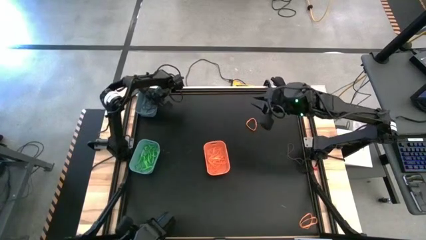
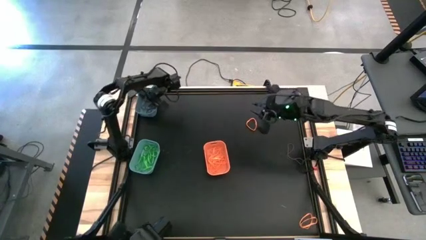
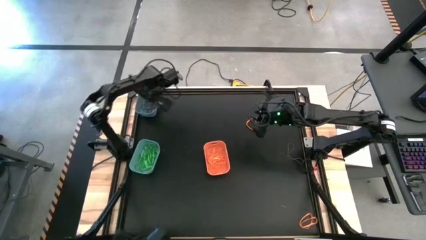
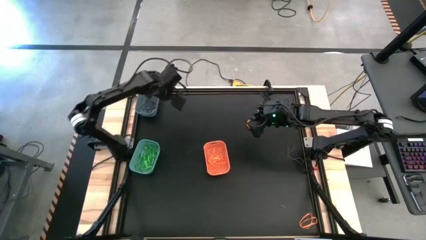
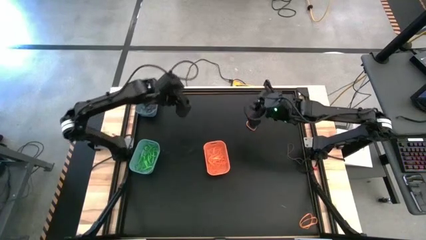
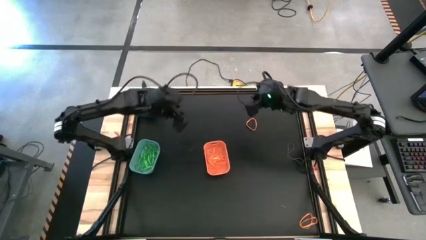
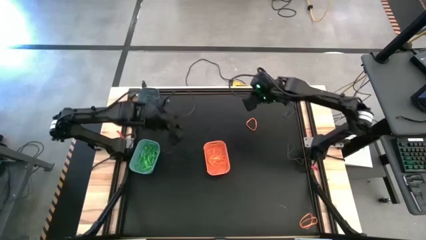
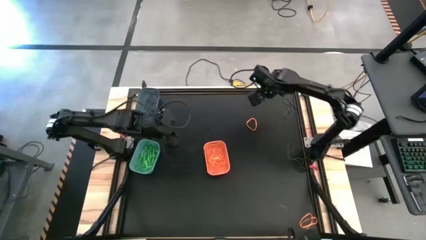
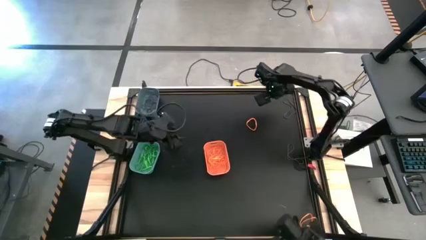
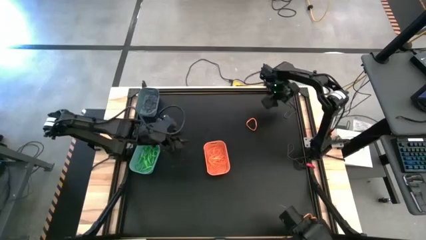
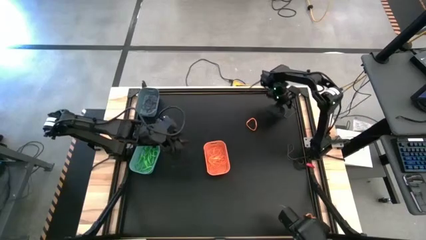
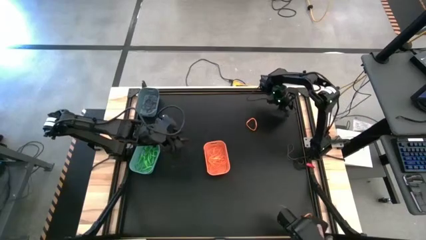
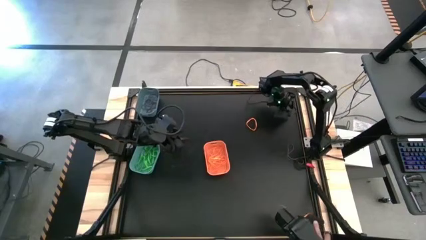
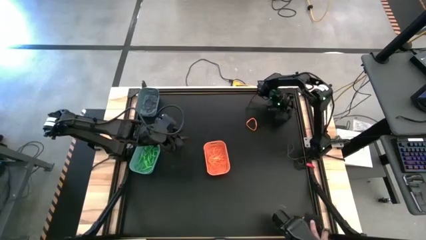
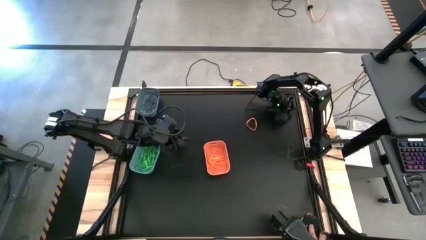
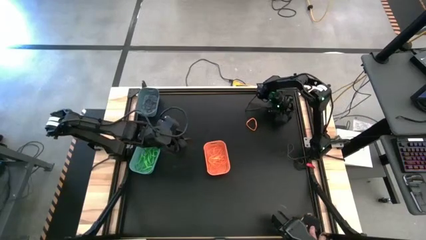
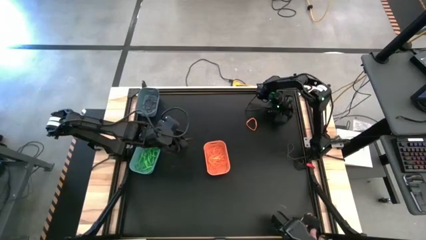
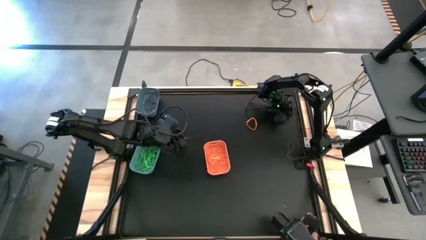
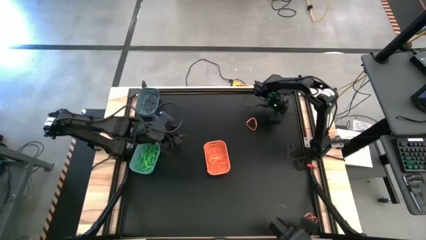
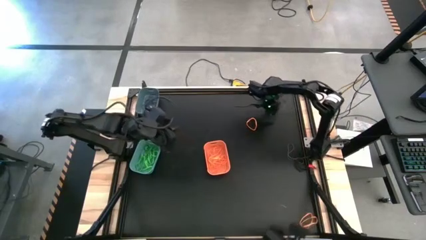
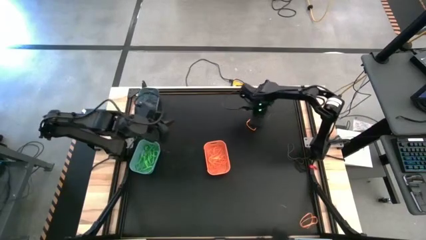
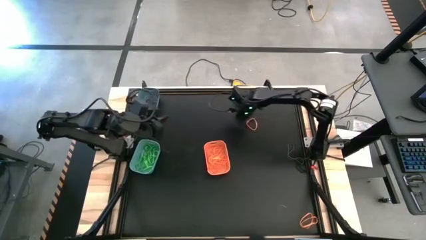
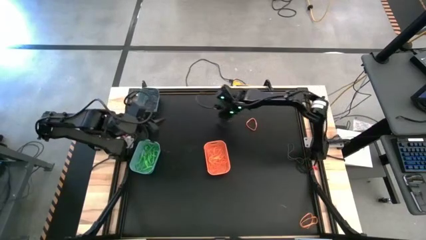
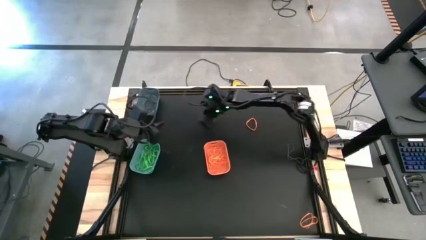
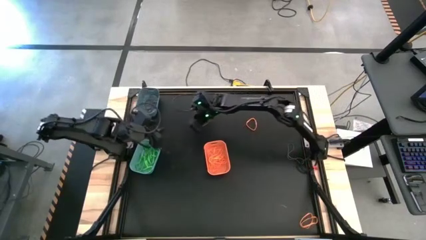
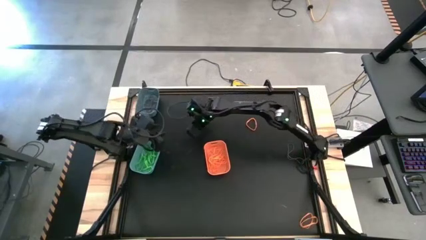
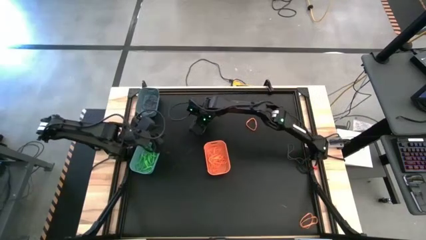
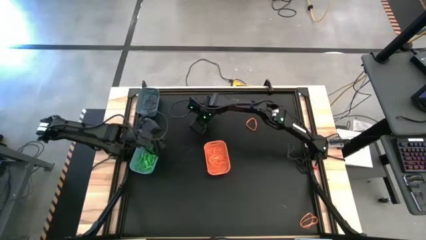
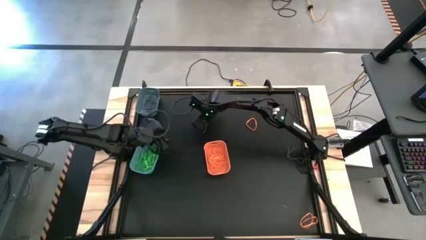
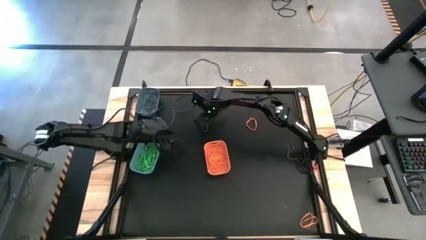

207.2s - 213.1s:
Task: Sort rubber bands into baskets
Move the purple rubber band

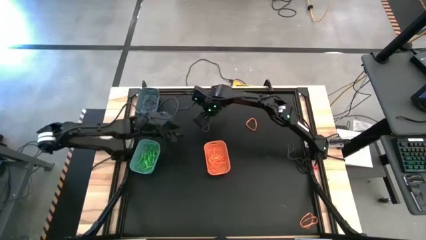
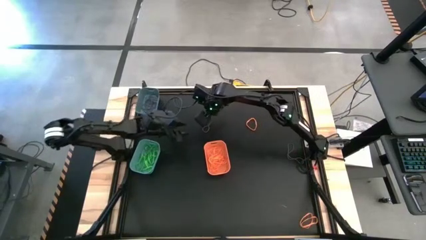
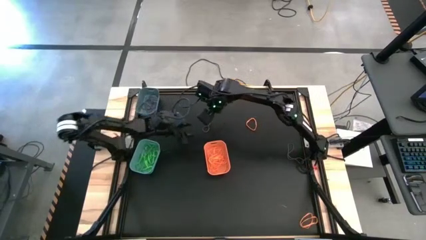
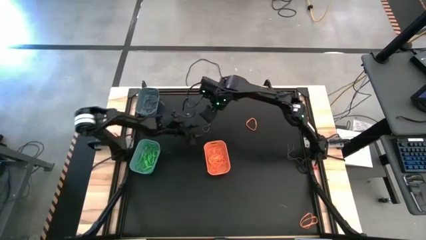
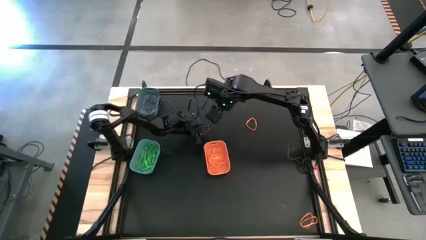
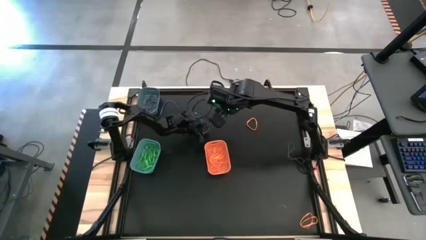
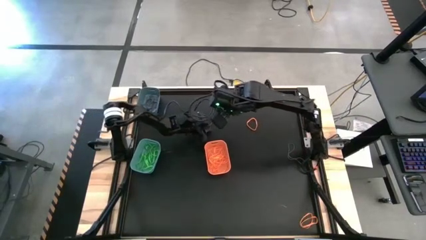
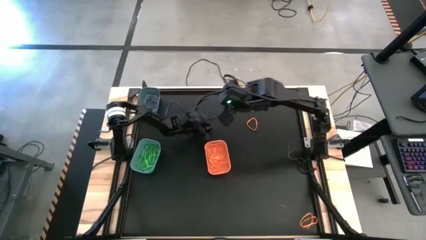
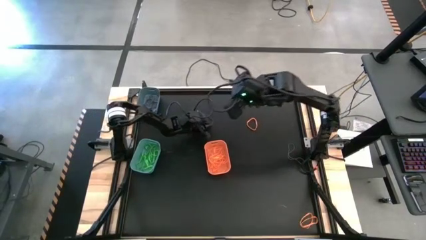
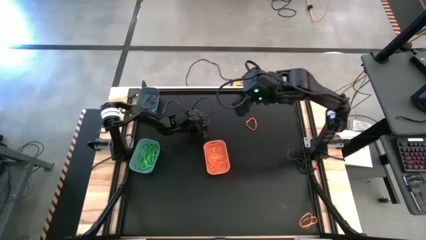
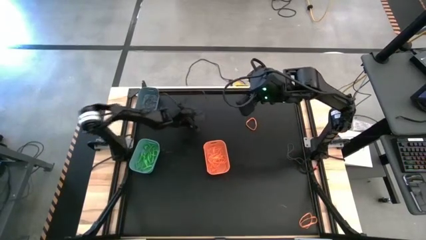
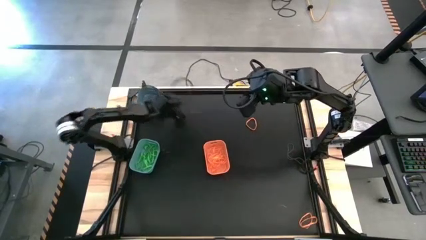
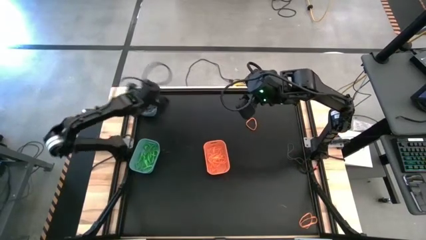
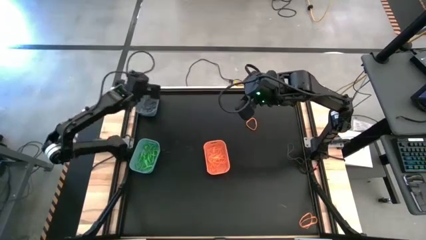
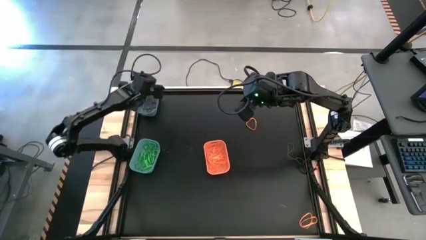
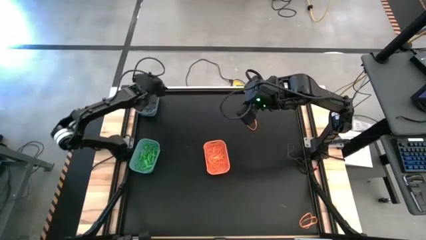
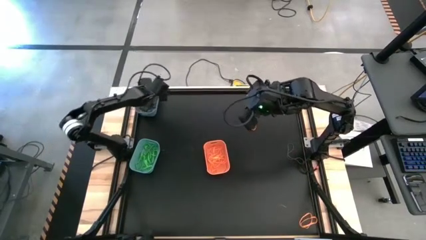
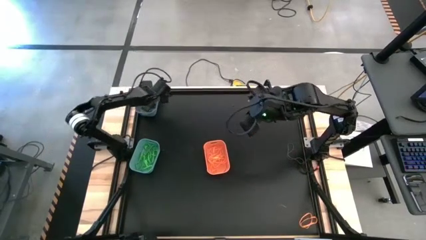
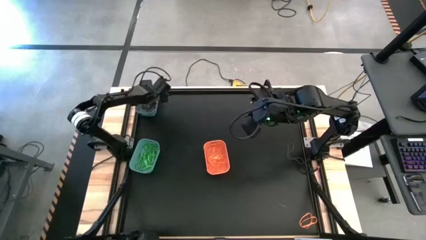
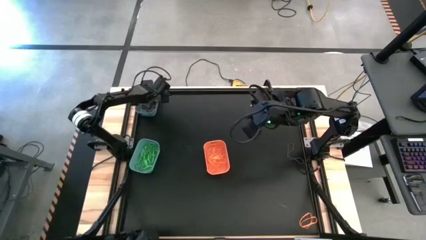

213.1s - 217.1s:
Put the purple rubber band into the sky blue bin

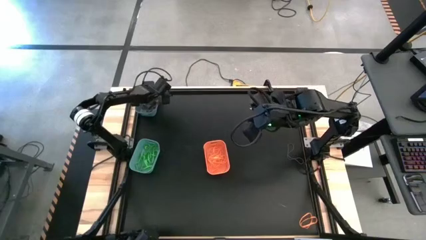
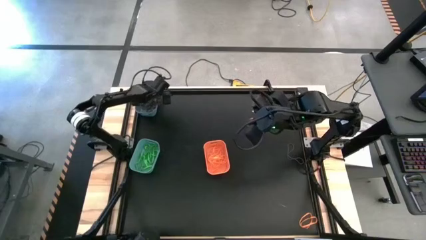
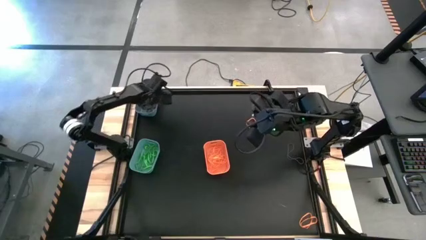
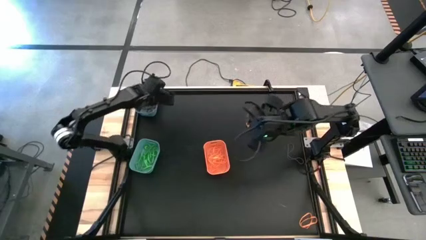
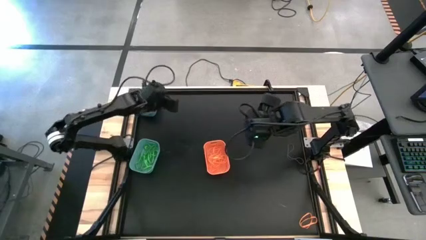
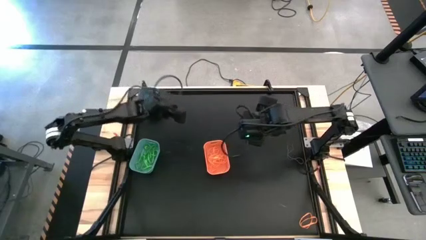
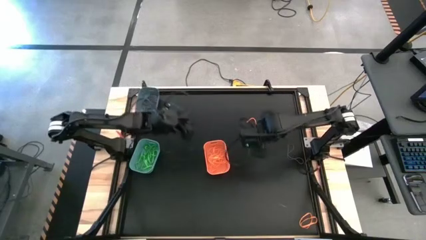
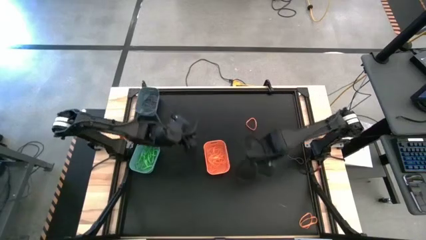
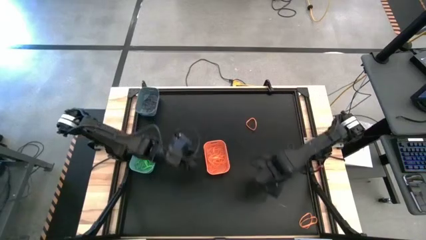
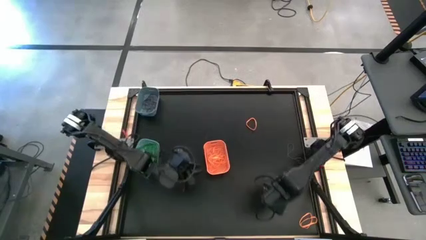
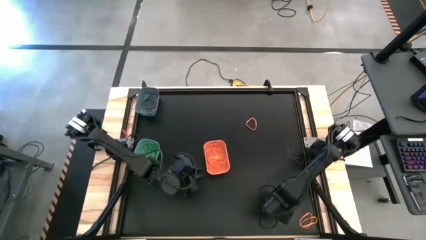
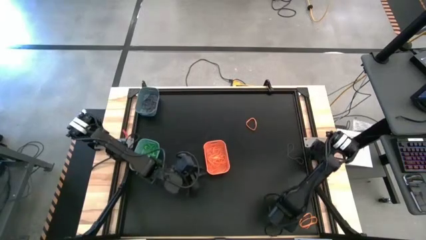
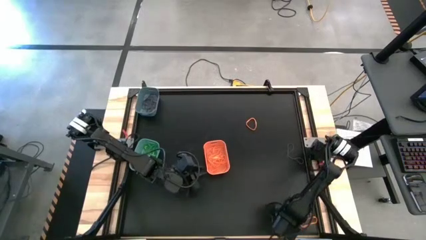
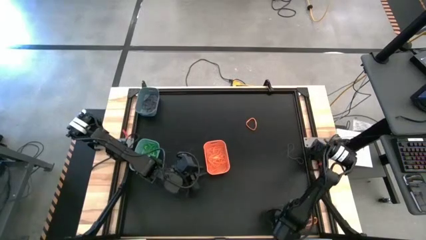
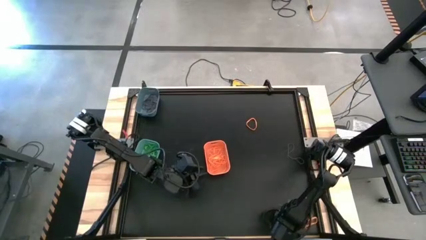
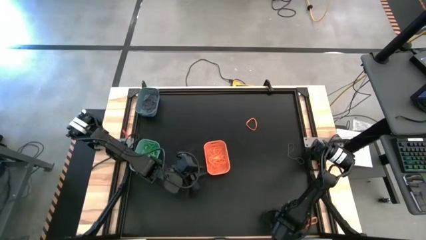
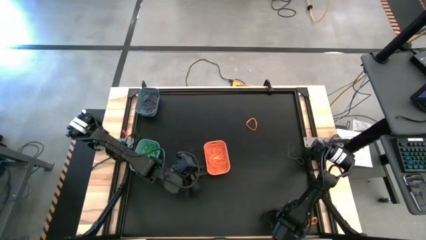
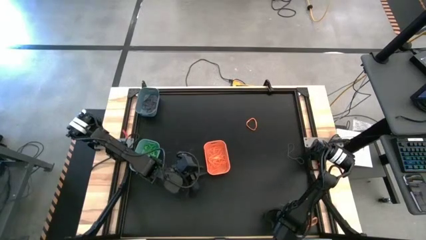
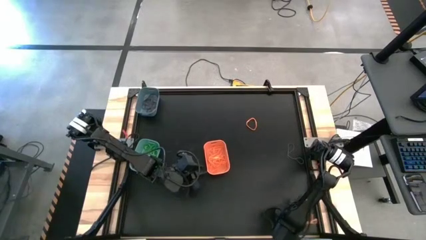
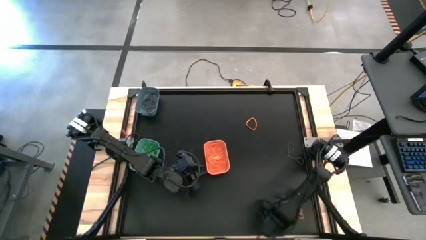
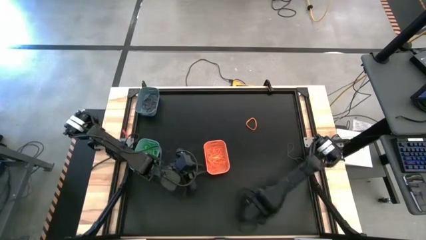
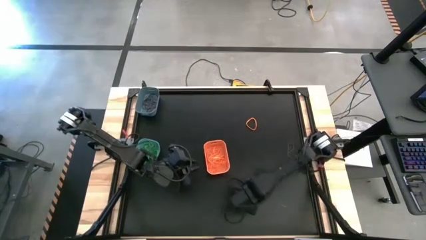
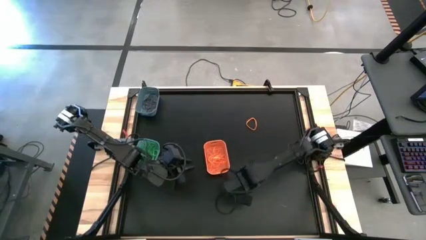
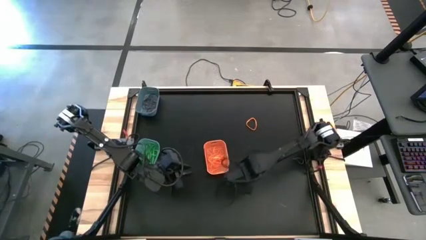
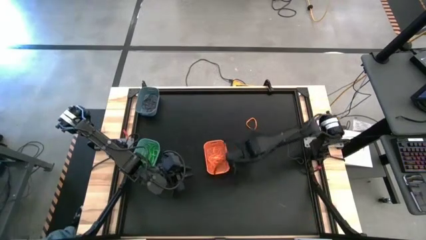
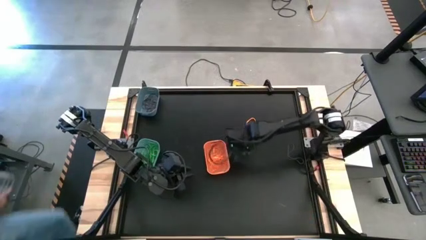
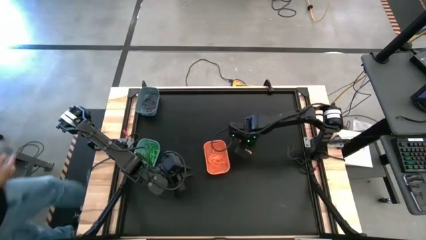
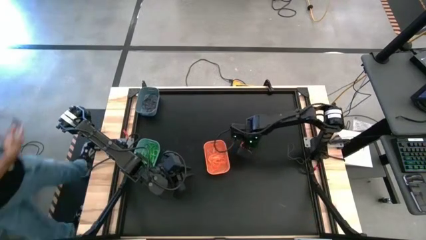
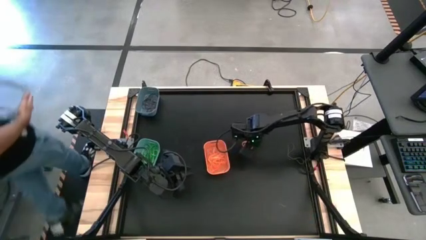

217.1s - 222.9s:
Move the orange rubber band
